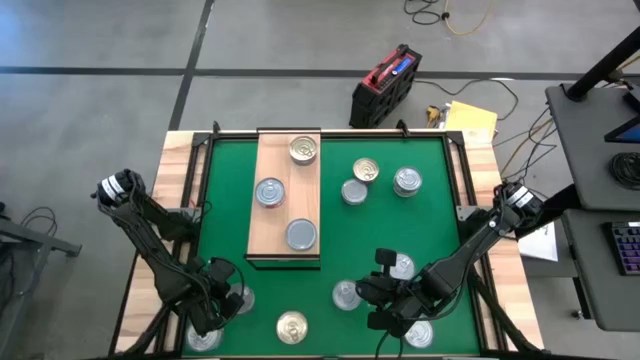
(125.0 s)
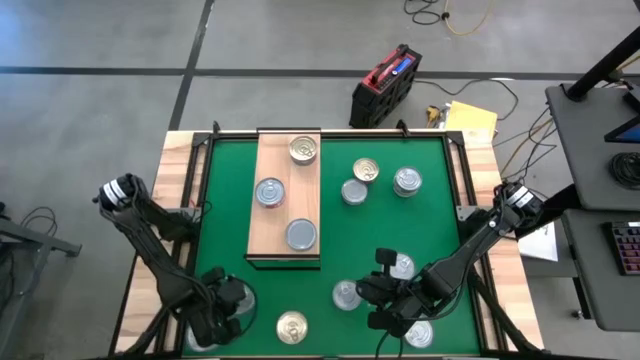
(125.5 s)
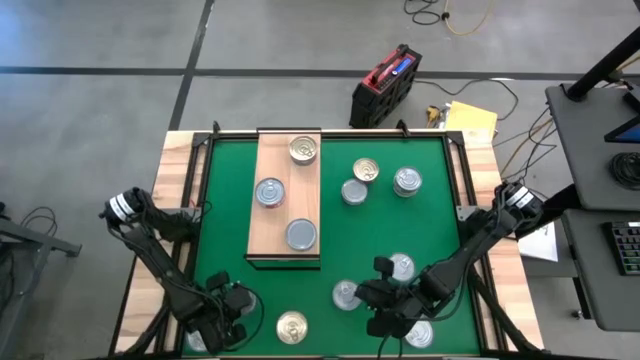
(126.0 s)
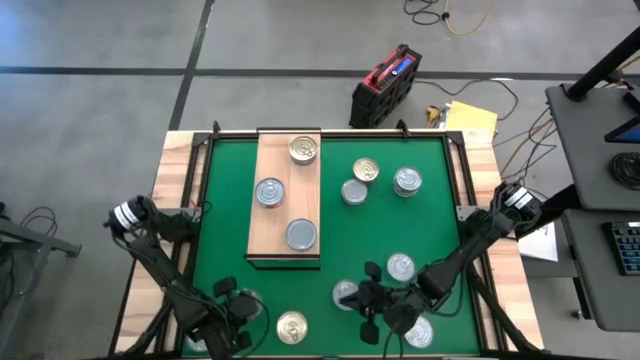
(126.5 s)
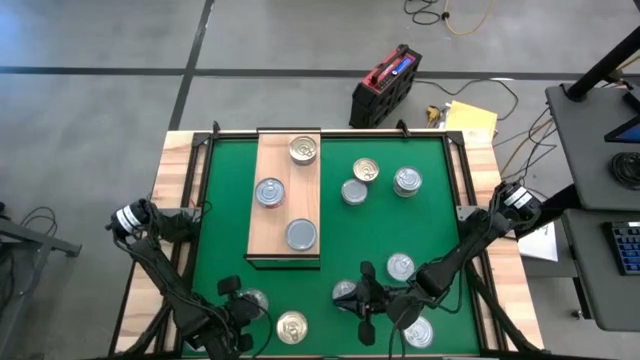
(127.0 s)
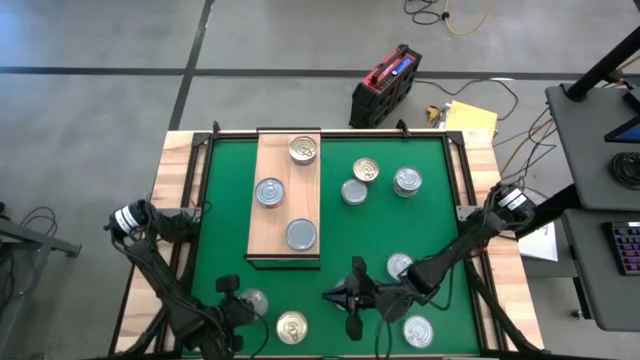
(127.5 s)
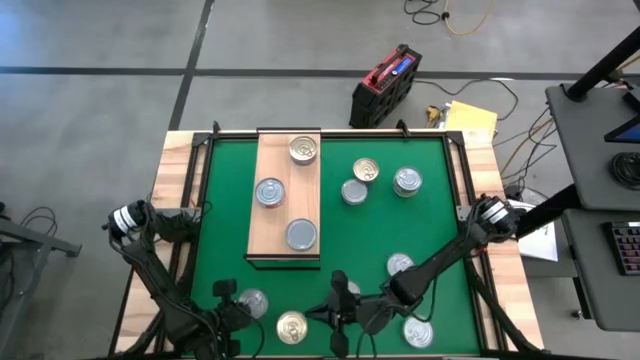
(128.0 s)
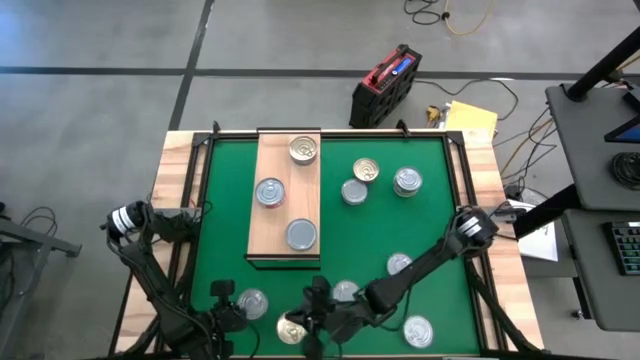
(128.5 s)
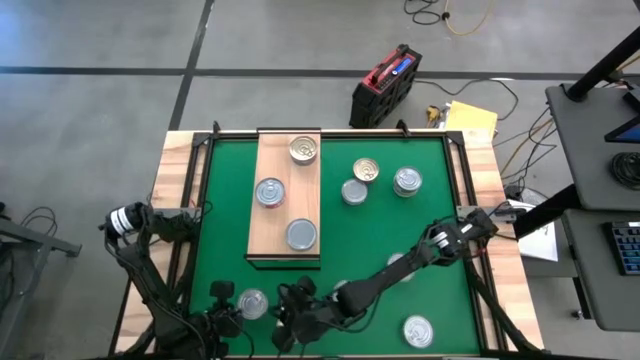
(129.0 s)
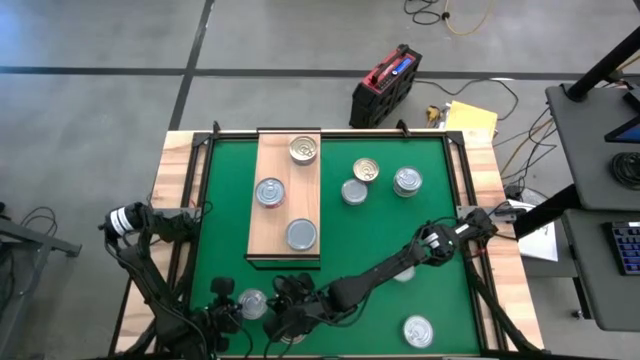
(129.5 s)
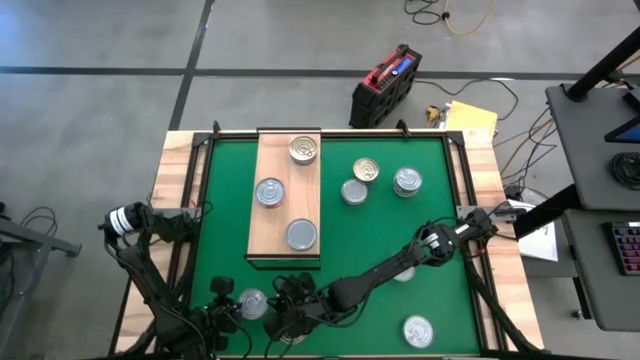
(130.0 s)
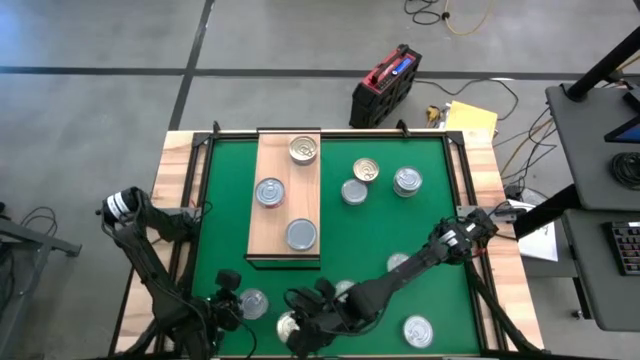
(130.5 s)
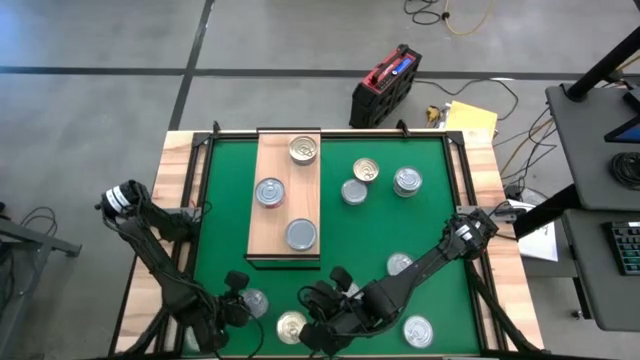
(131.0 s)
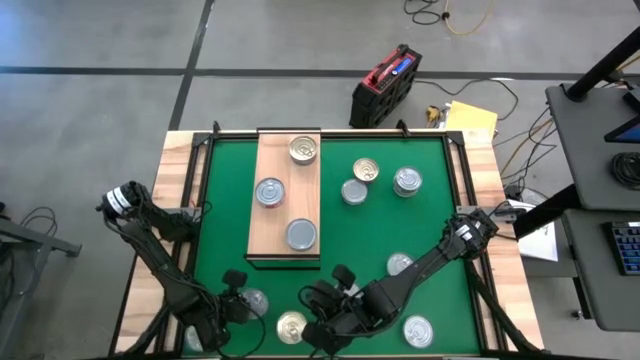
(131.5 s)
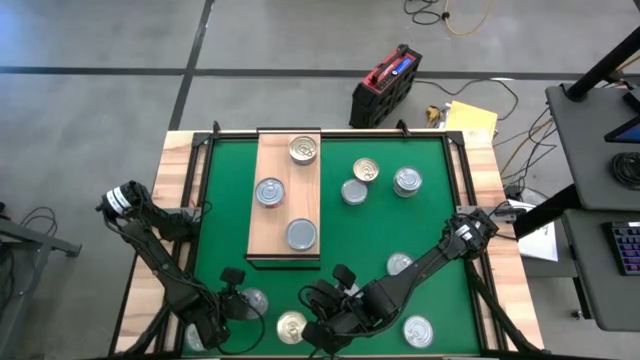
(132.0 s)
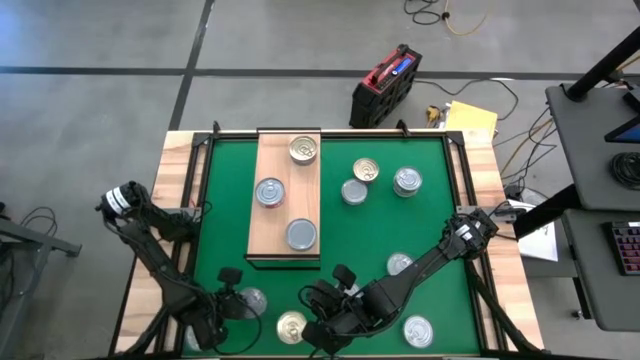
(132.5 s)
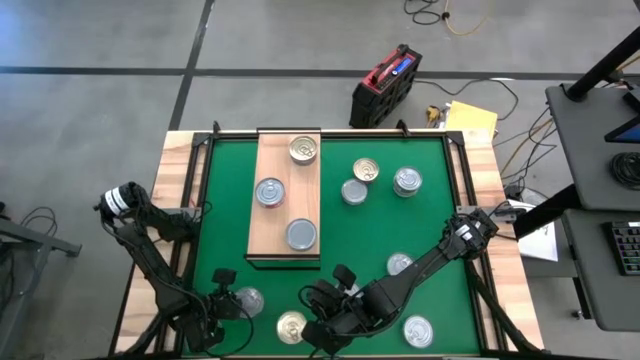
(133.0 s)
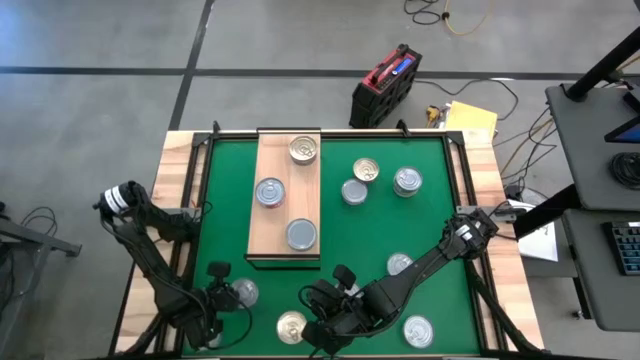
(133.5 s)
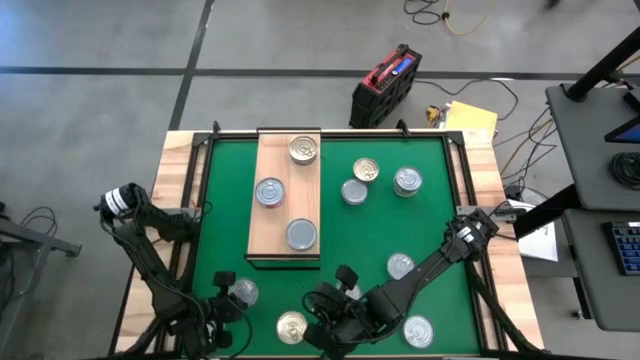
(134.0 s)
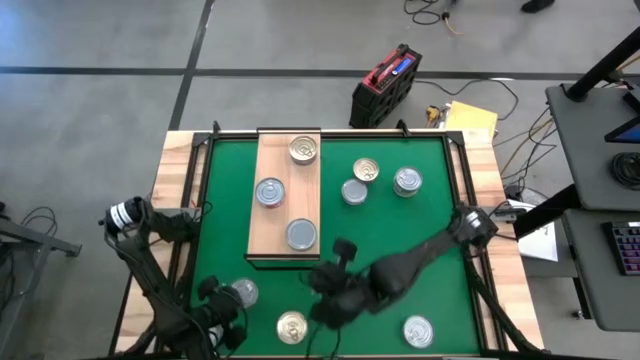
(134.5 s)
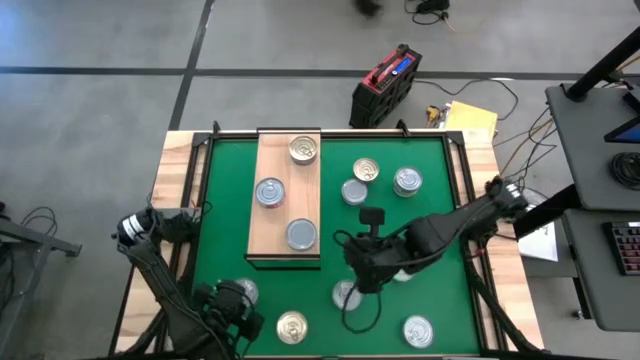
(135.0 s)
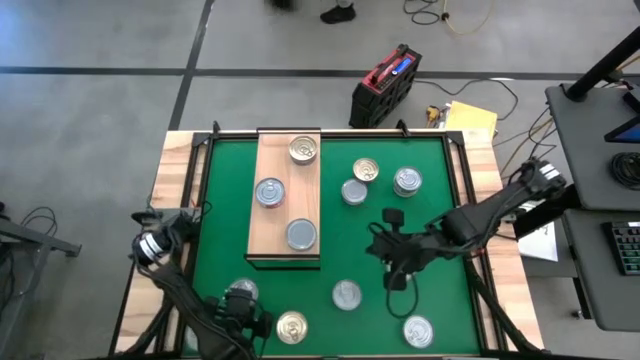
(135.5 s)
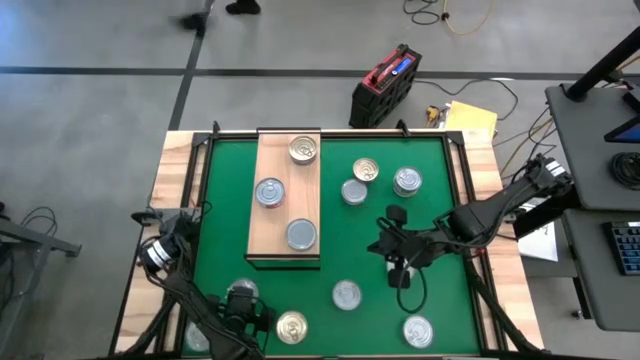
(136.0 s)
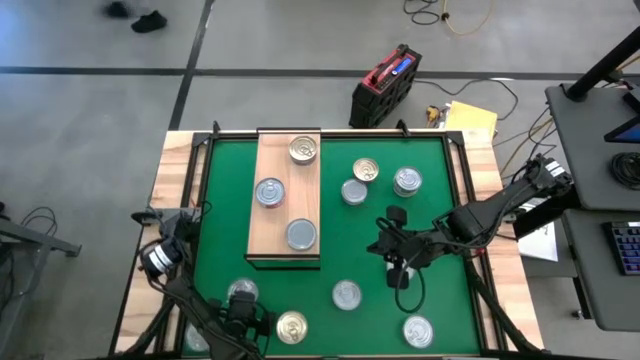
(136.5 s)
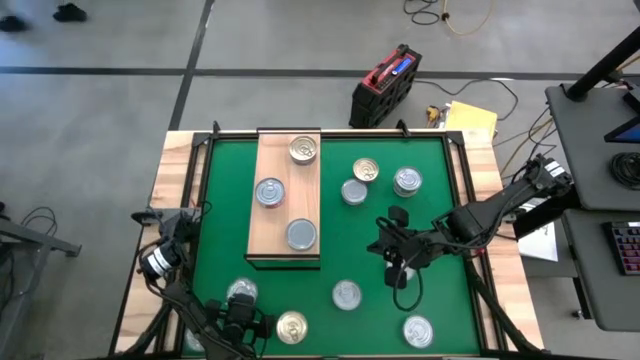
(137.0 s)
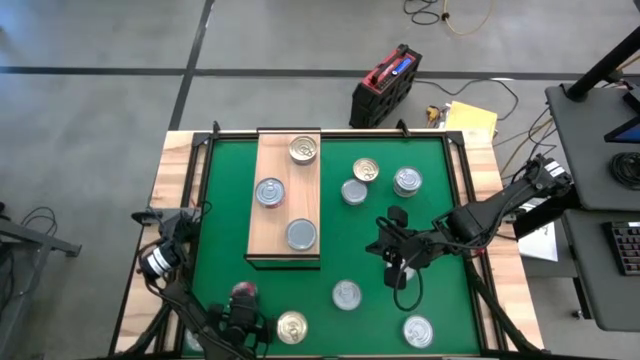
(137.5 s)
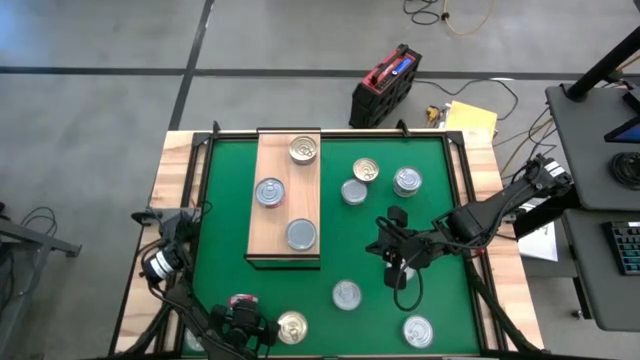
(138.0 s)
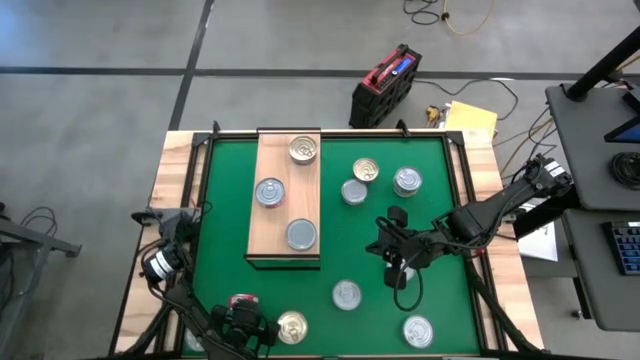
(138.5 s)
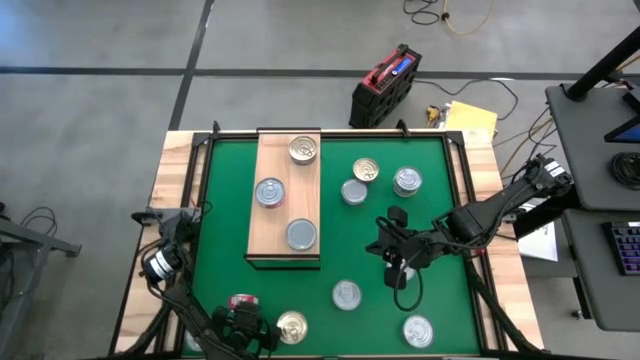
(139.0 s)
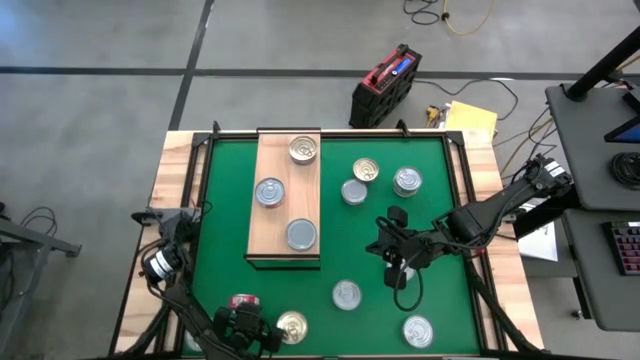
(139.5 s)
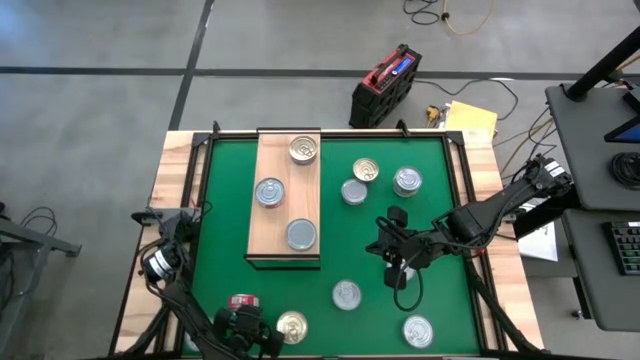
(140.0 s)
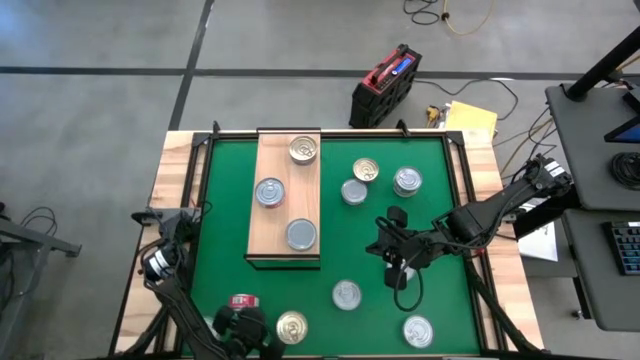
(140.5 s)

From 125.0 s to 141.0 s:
Task: Stack canned seafood by type on shelf
Stack the red tuna can on top of the red tuna can on the shelf

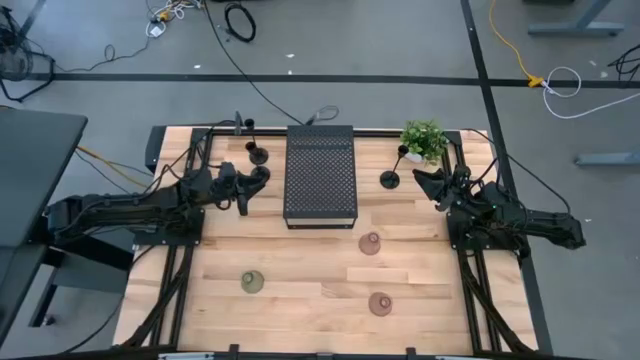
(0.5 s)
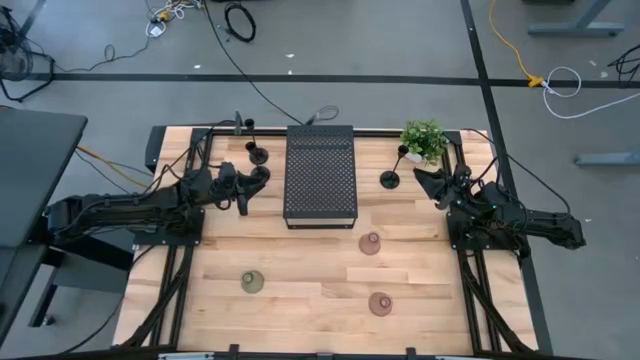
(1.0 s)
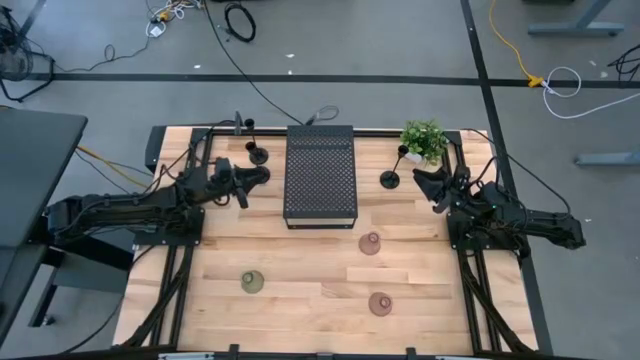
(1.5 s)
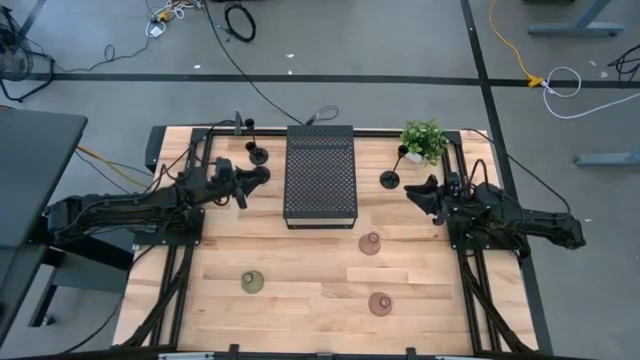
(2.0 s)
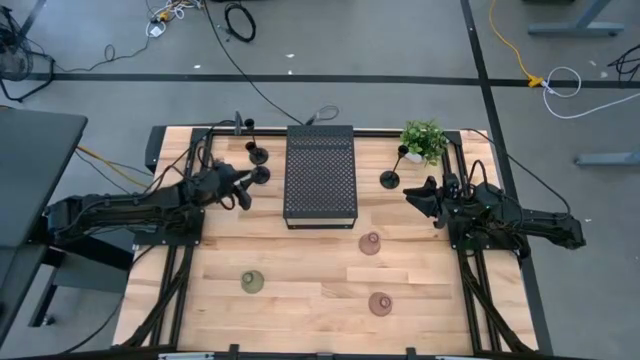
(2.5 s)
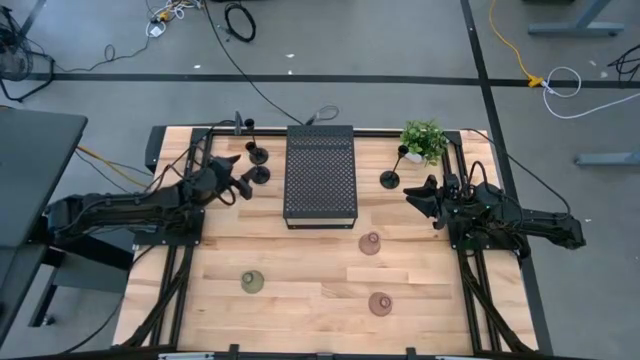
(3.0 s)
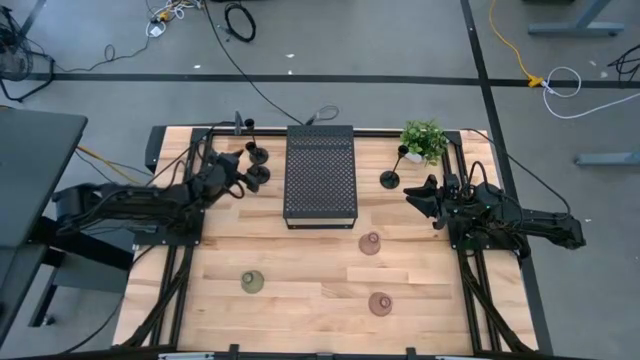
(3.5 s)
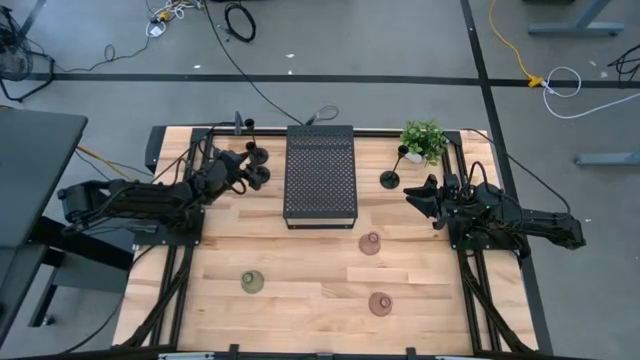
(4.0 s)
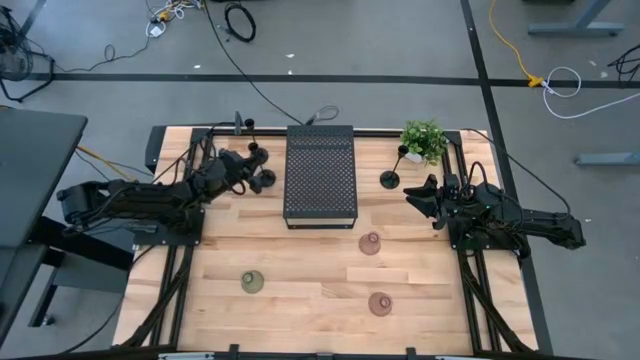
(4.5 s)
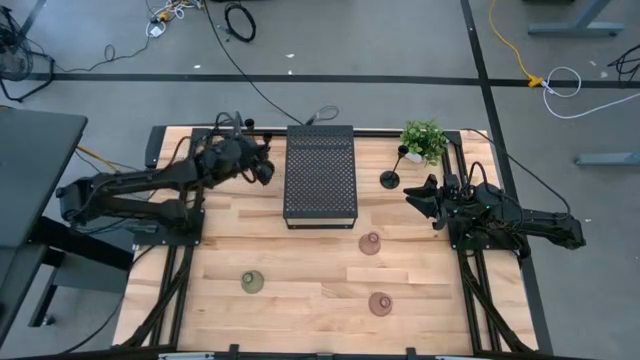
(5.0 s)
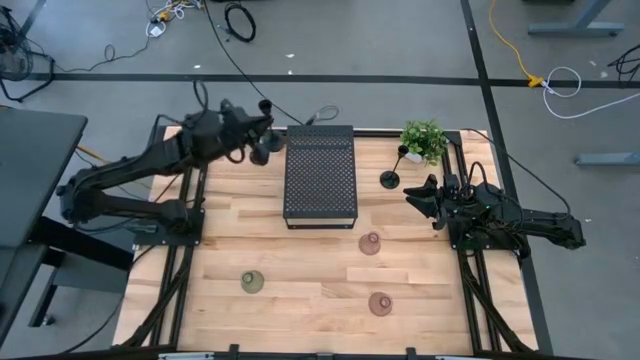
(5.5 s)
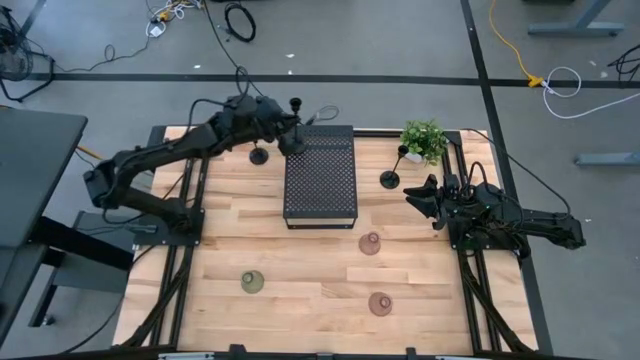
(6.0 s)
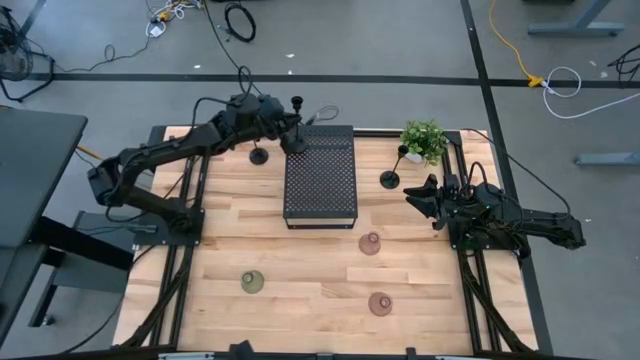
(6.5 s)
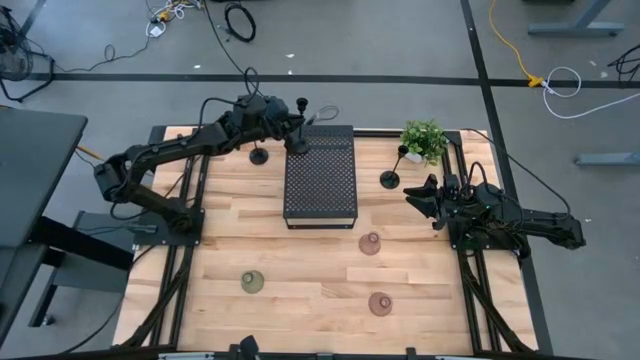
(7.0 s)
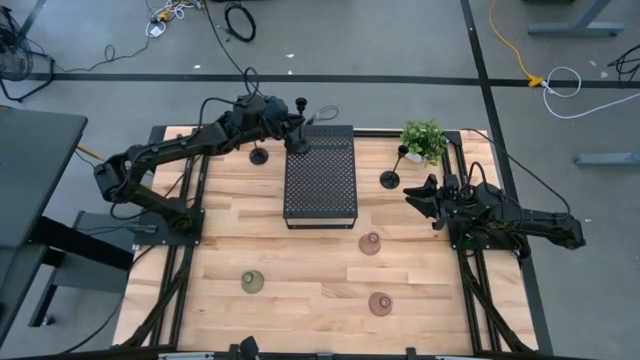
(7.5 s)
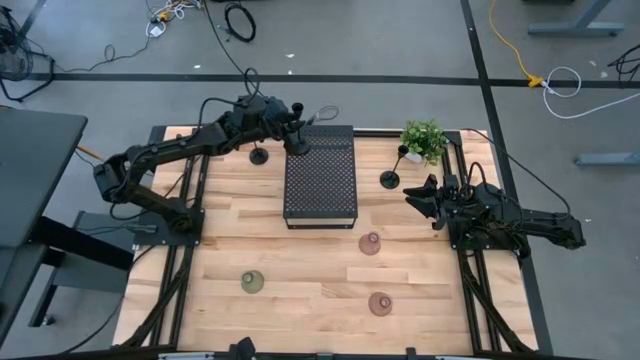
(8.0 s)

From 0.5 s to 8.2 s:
Task: Pick & Place candle stick holders
Put the bottom left black candle holder on the shelf
